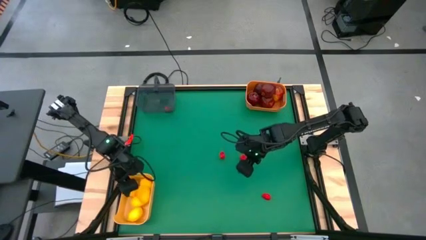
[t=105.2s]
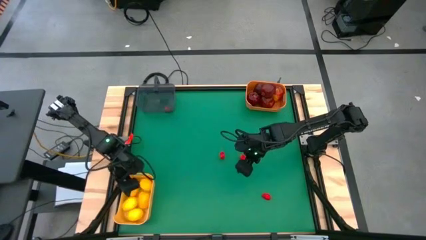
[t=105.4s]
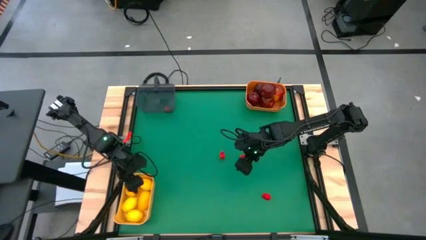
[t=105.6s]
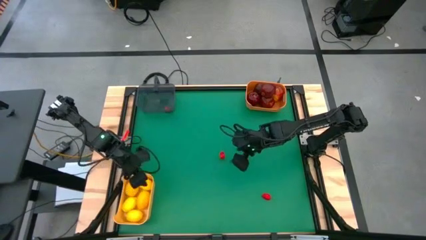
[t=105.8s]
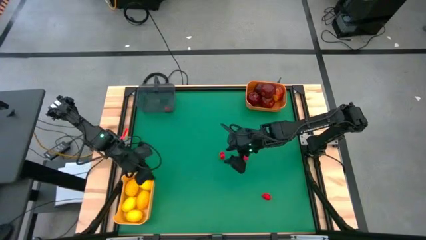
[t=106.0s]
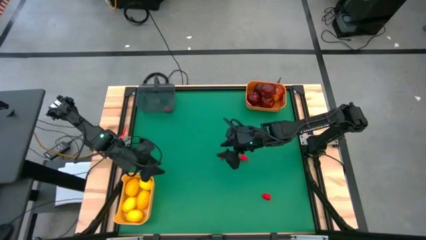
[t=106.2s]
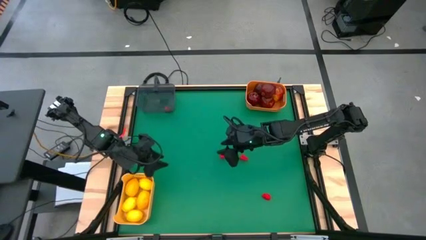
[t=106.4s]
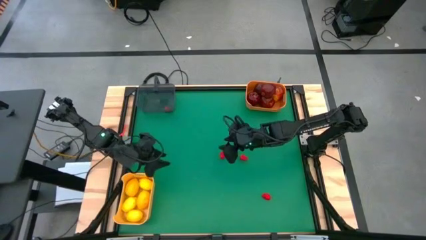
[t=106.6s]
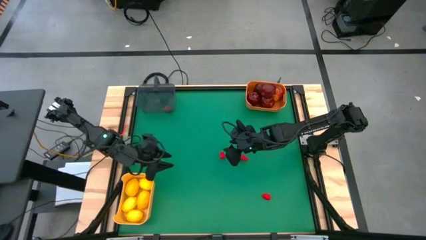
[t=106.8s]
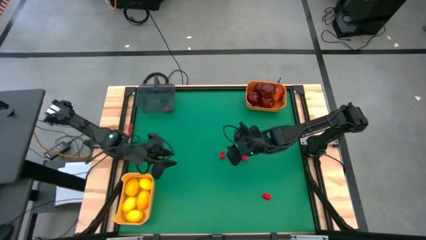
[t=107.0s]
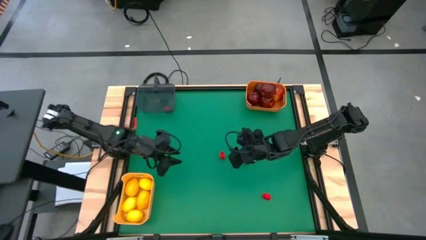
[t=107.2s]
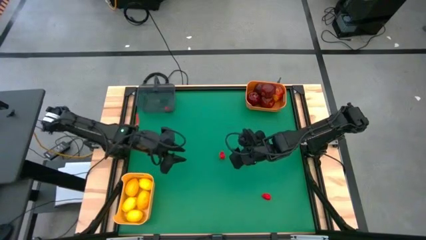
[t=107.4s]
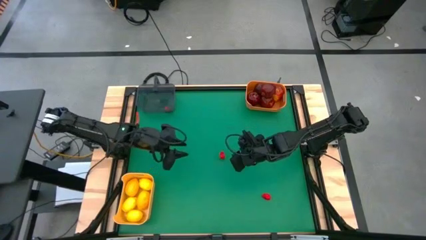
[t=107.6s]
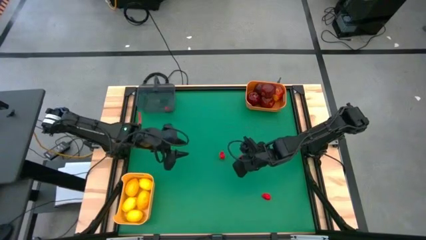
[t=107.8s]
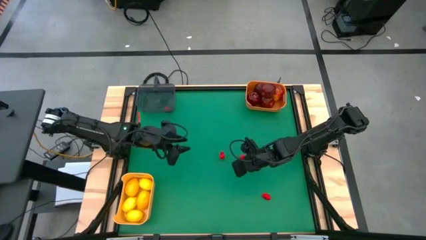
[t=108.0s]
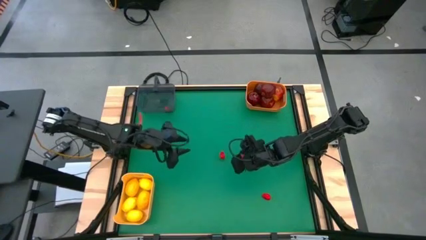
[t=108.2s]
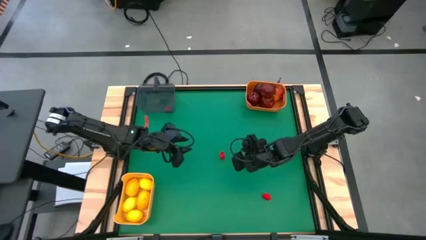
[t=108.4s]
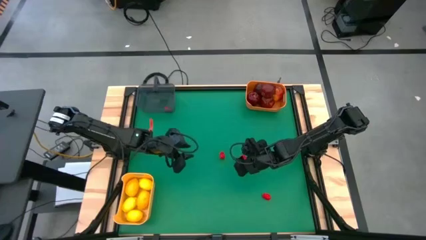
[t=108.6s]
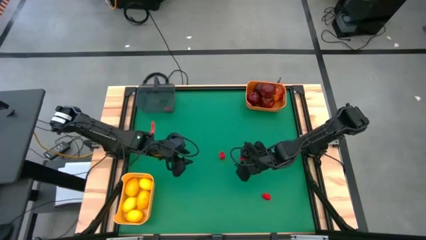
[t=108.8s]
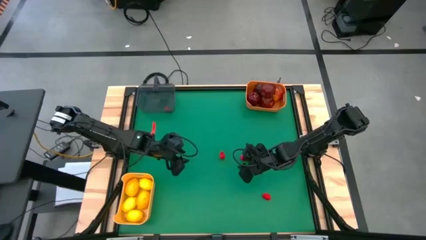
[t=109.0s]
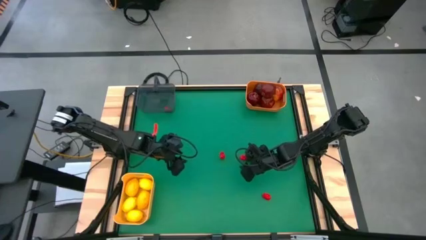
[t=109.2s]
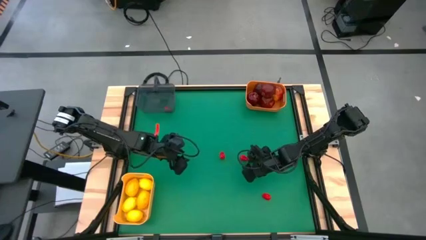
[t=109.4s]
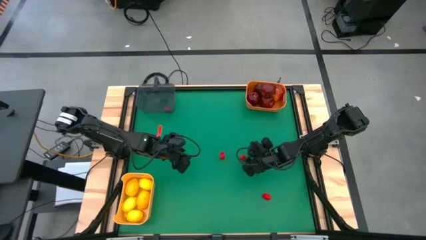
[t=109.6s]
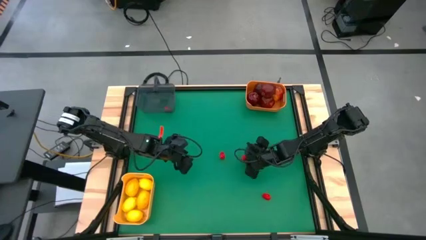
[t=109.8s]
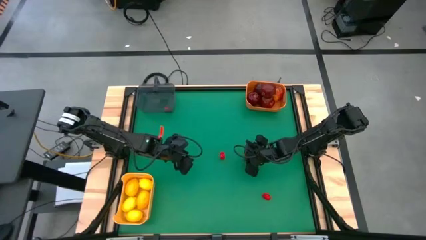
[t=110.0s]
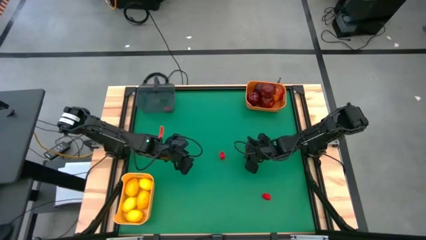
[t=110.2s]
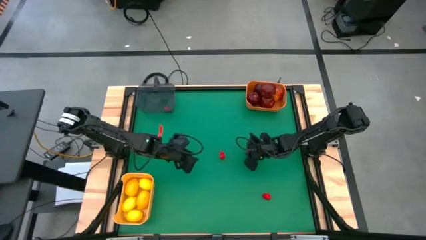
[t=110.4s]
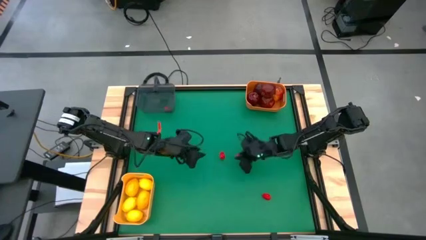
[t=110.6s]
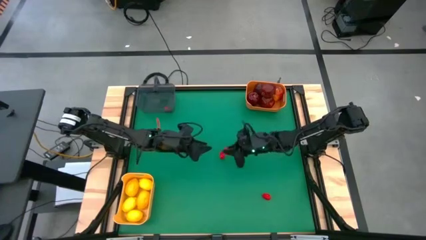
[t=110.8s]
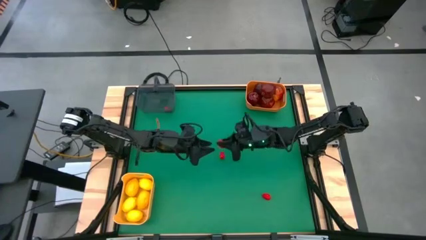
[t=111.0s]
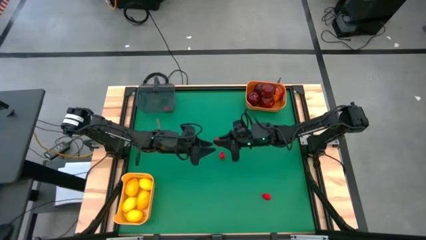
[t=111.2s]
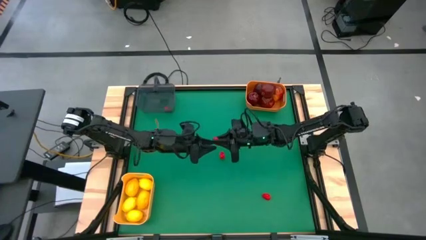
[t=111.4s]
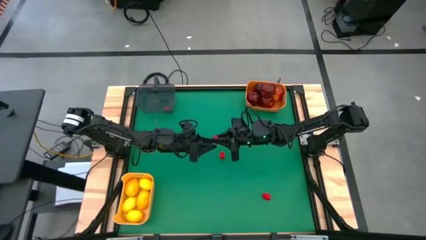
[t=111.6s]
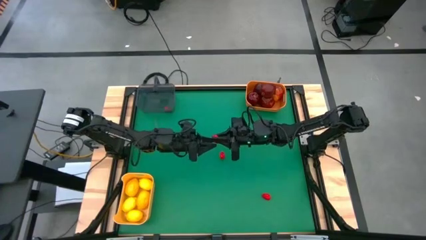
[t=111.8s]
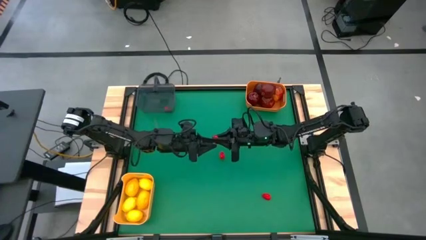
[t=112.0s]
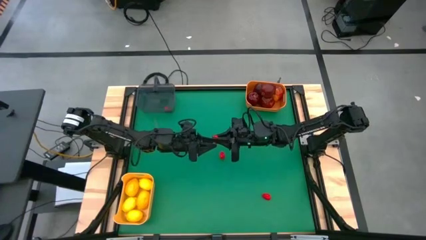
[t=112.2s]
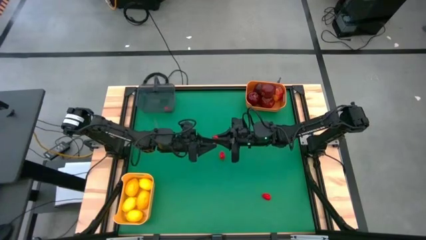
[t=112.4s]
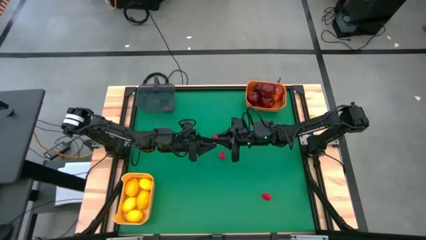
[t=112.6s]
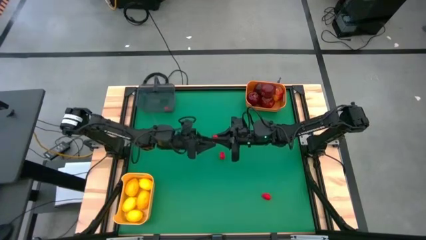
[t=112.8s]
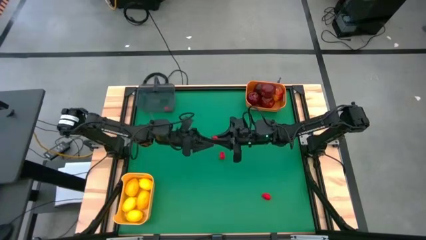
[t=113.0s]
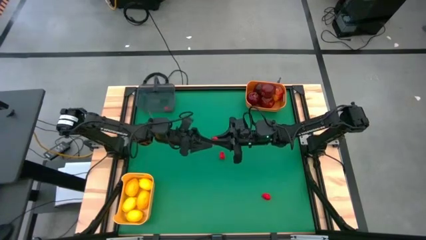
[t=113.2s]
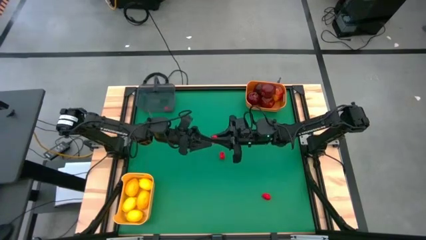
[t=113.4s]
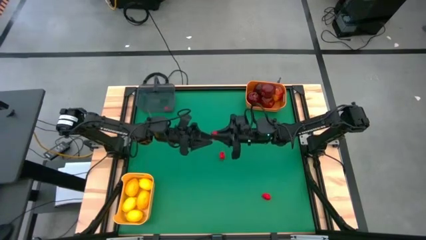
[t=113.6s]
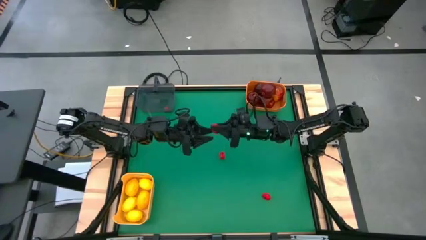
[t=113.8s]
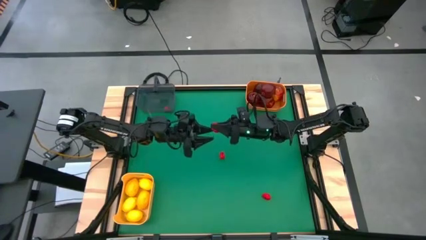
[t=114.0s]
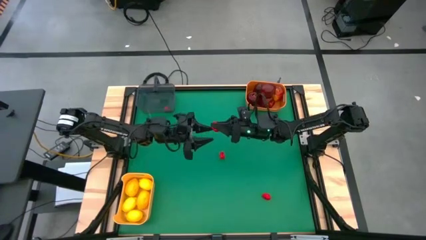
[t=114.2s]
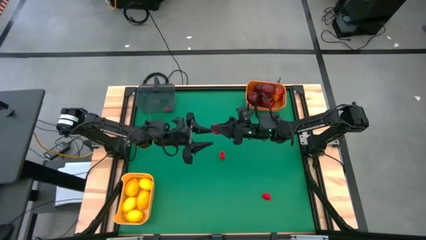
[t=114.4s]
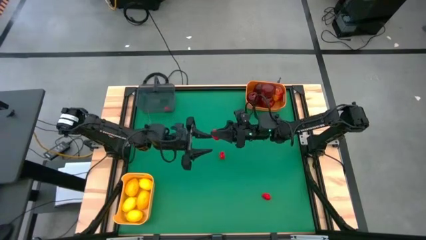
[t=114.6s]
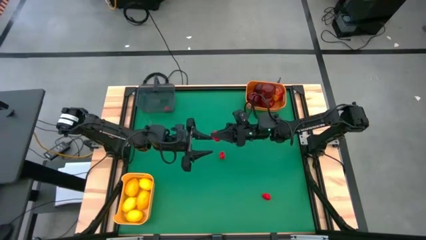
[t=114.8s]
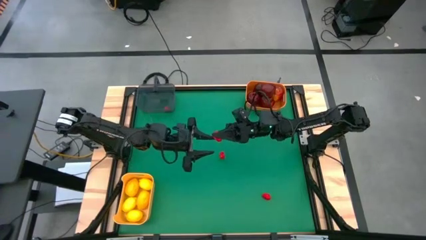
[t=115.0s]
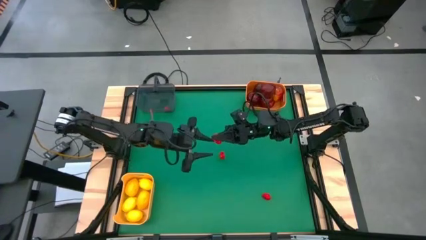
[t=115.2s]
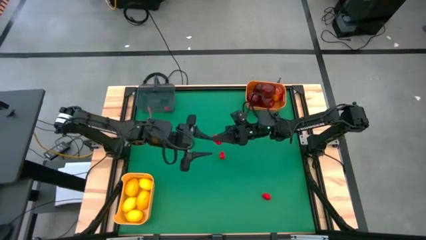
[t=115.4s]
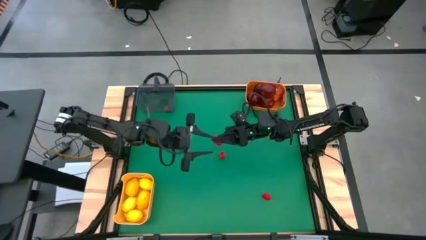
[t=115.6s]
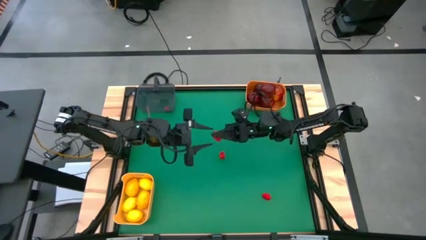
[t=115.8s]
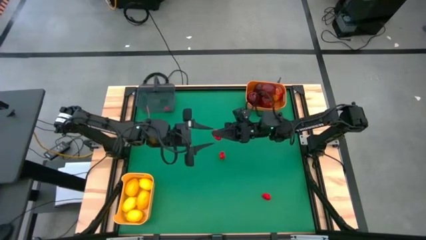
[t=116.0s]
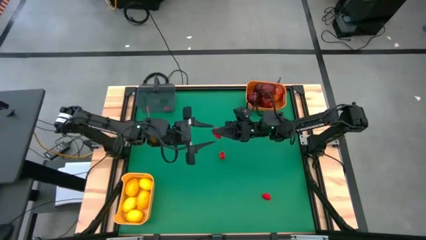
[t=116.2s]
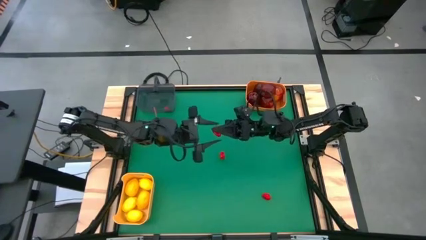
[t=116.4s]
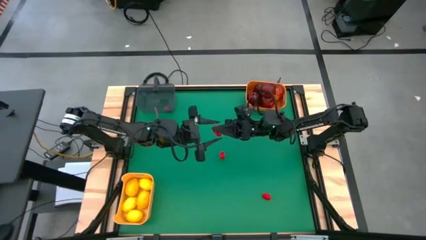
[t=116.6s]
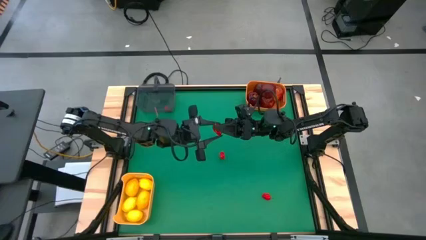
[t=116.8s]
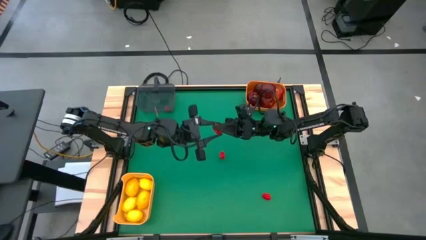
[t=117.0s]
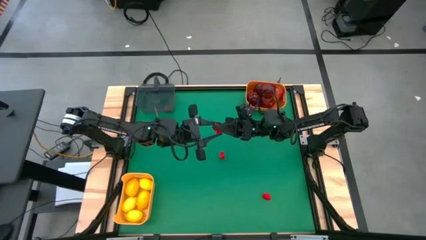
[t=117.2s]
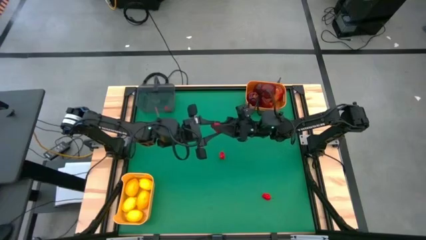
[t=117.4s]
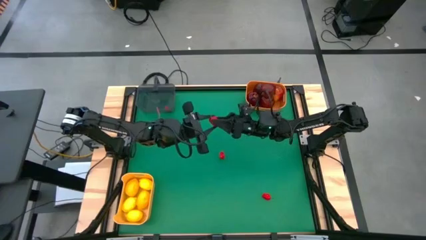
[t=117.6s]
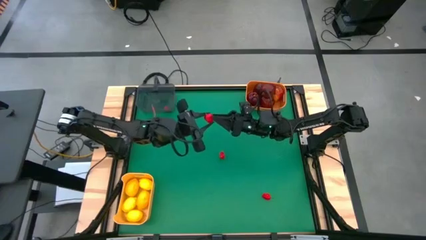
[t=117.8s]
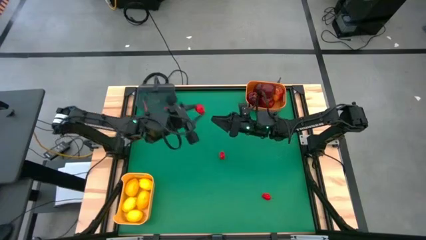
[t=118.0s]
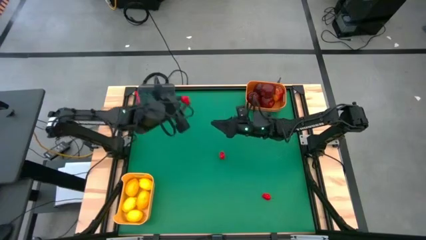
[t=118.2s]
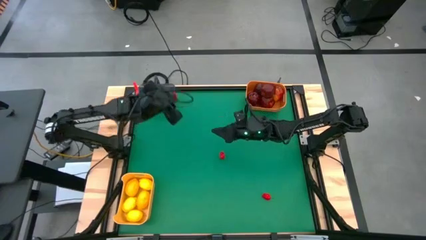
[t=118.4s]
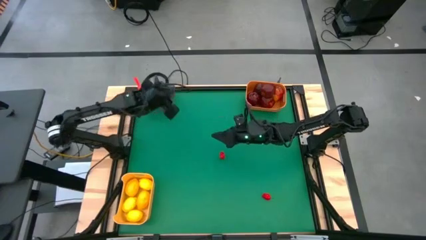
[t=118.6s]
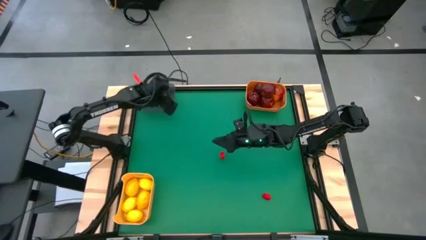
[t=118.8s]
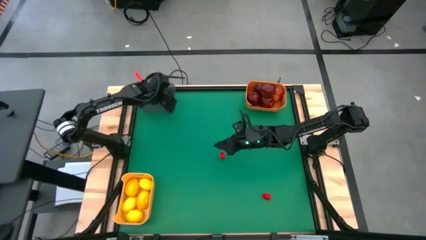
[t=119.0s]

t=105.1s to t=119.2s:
Task: Sort produce into baskets
Put the middle red chili pepper into the black bin

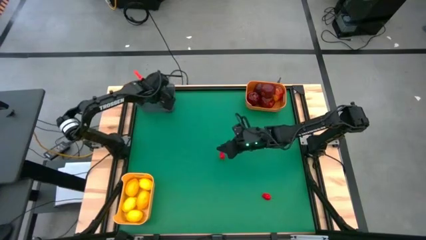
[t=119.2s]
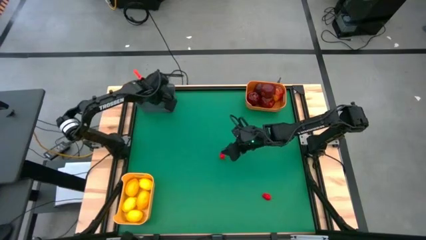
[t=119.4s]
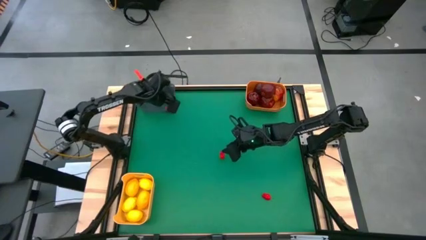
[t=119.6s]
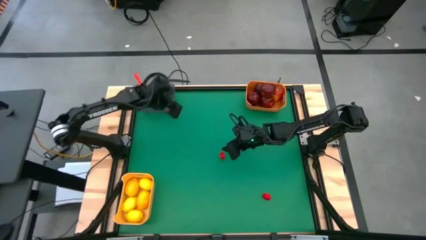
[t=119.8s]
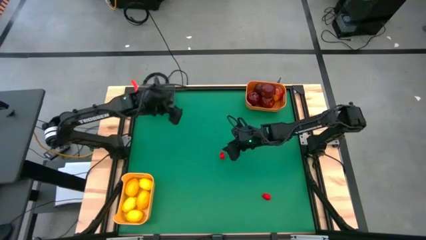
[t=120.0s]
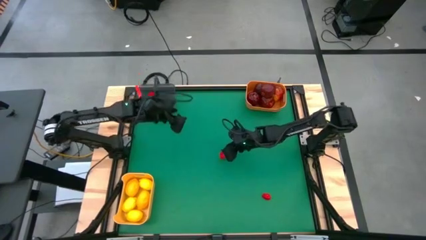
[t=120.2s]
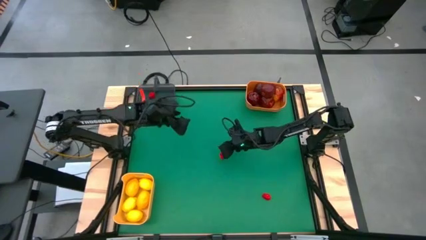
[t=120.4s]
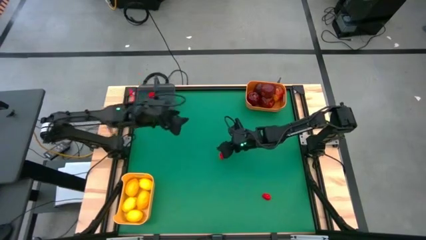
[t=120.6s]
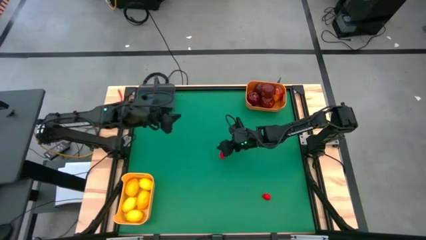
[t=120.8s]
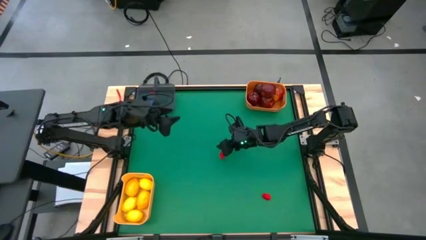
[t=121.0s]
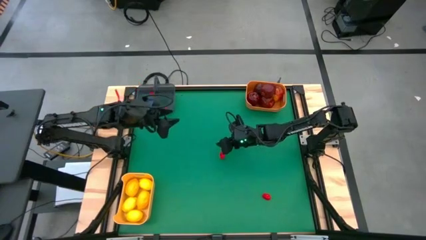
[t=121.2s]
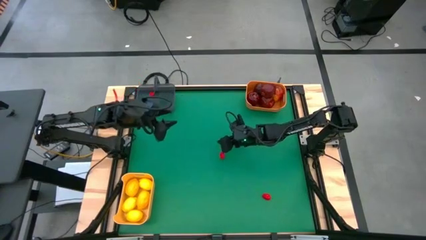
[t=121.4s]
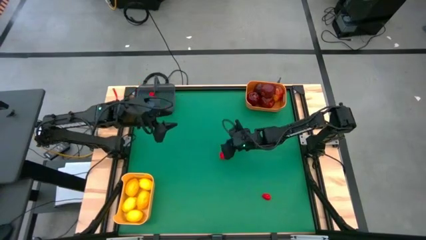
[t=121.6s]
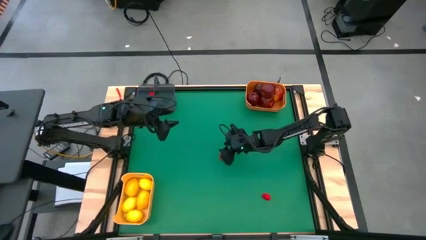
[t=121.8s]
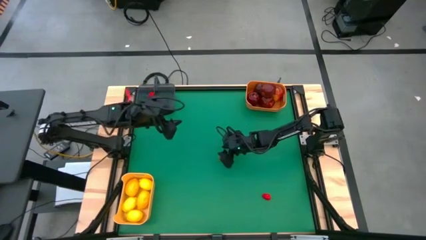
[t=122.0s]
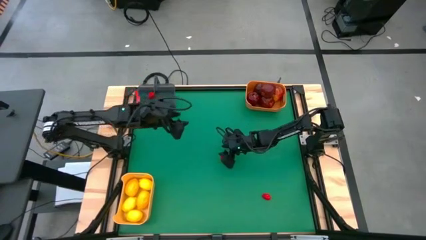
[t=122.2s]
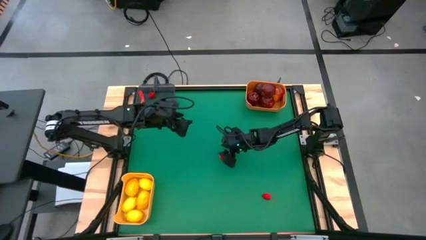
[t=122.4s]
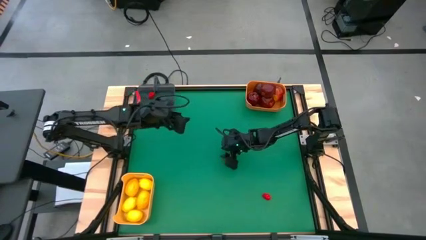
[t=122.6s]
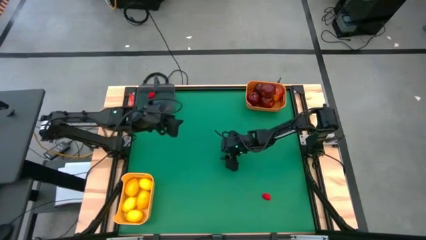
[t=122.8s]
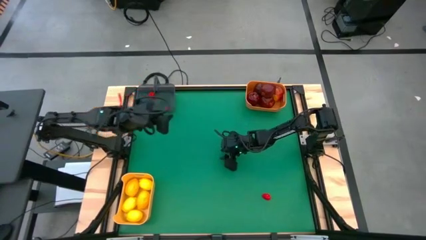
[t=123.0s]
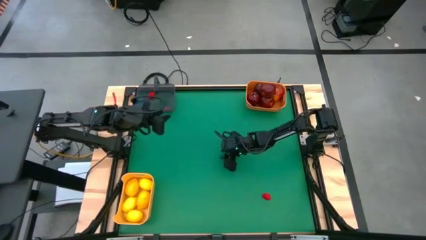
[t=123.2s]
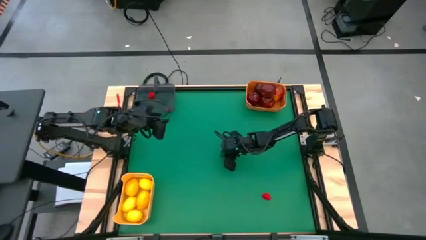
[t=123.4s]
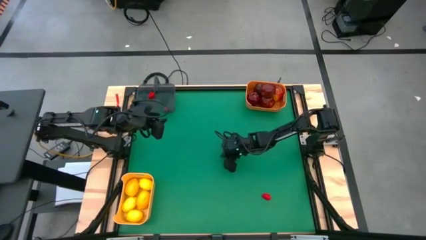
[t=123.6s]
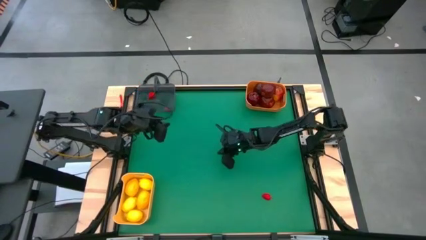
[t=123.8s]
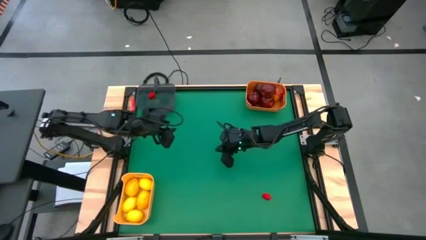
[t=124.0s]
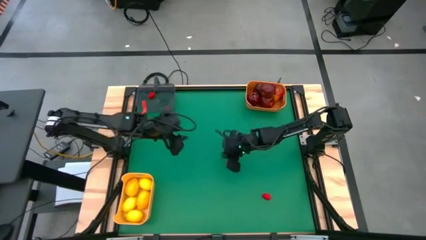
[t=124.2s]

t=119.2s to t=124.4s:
Put the top red chili pepper into the black bin
